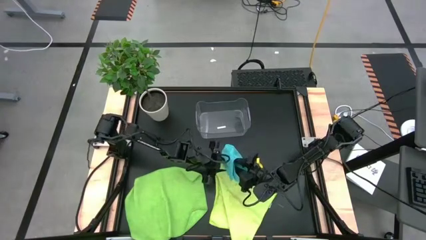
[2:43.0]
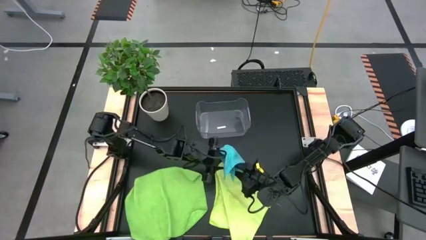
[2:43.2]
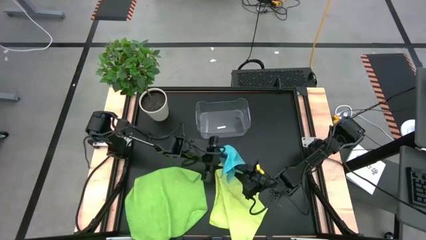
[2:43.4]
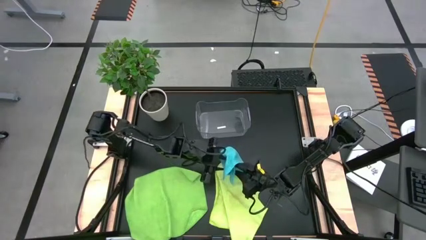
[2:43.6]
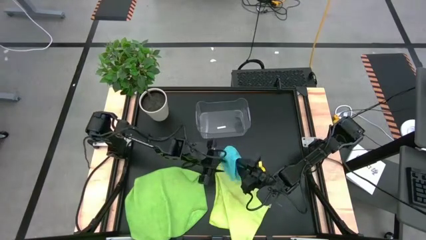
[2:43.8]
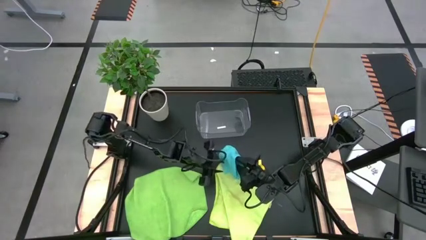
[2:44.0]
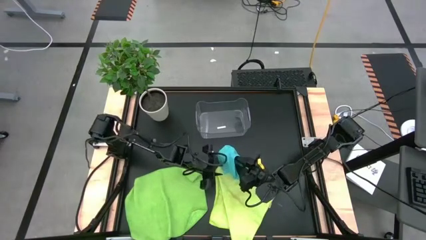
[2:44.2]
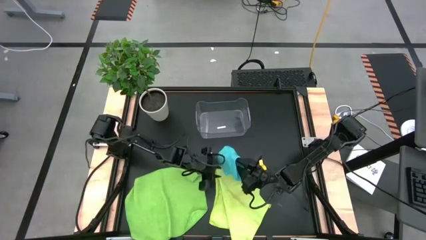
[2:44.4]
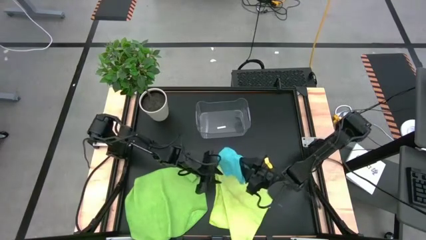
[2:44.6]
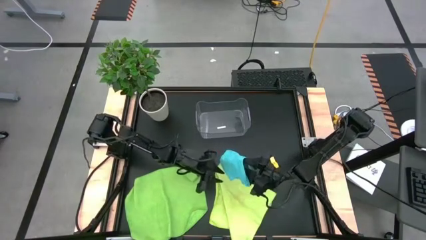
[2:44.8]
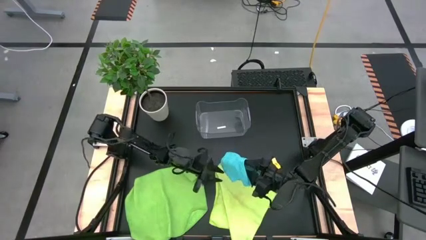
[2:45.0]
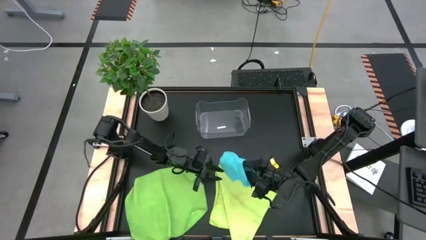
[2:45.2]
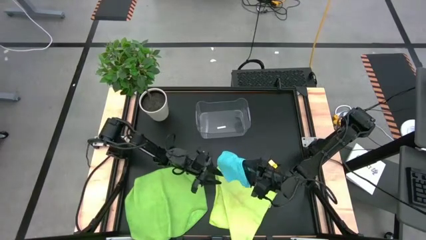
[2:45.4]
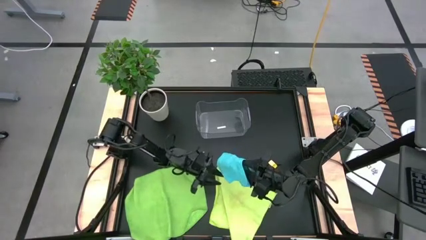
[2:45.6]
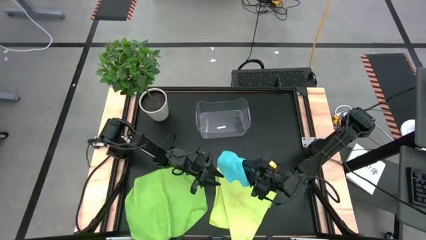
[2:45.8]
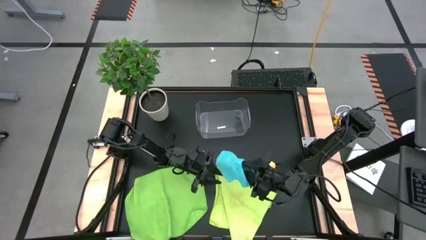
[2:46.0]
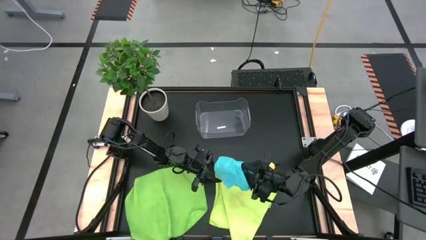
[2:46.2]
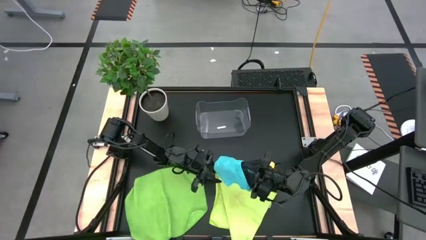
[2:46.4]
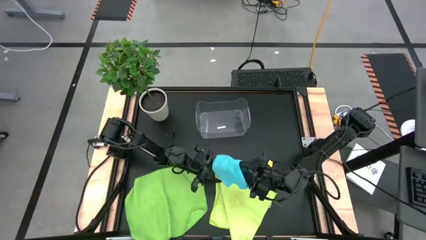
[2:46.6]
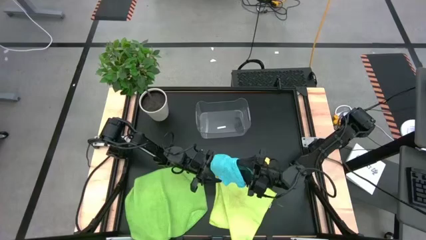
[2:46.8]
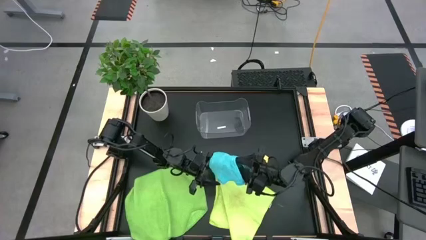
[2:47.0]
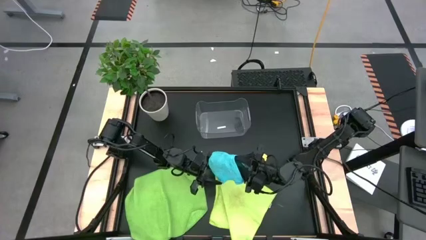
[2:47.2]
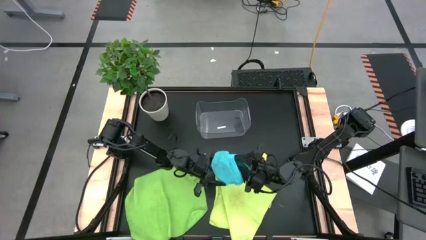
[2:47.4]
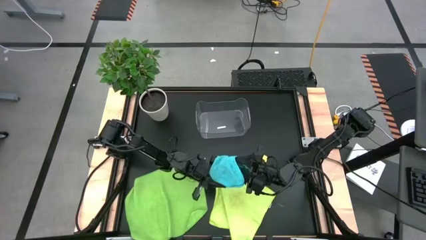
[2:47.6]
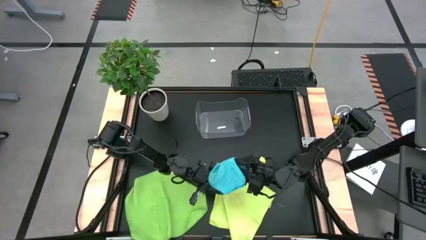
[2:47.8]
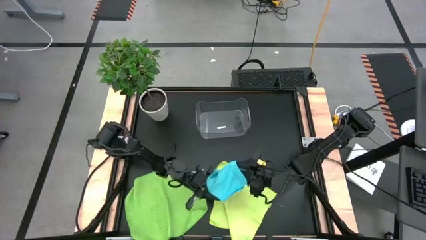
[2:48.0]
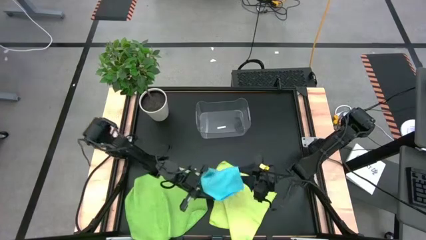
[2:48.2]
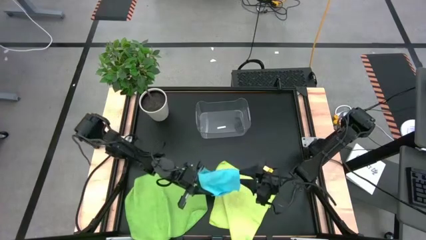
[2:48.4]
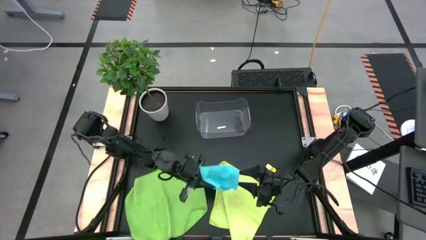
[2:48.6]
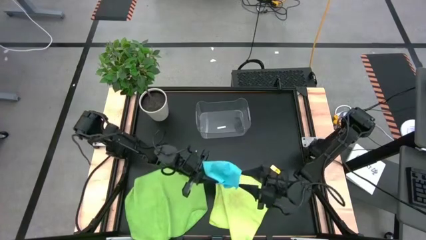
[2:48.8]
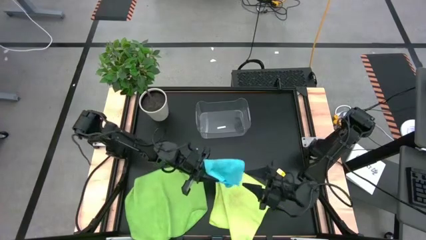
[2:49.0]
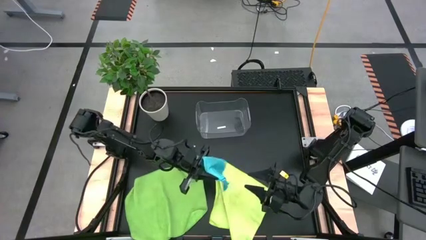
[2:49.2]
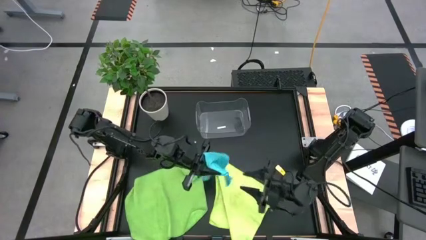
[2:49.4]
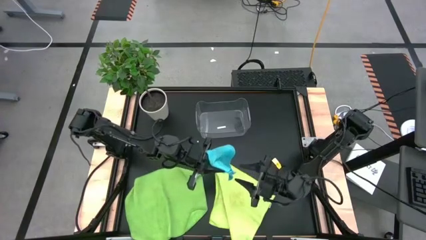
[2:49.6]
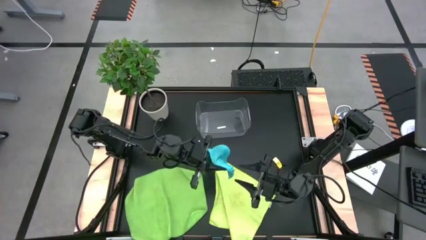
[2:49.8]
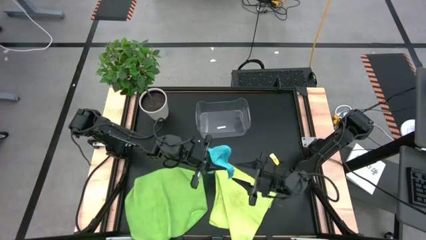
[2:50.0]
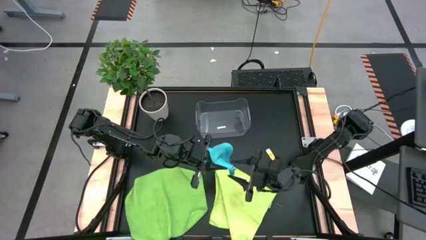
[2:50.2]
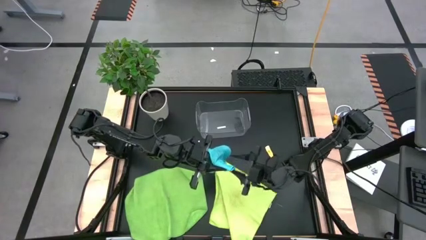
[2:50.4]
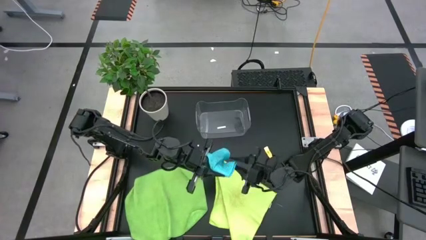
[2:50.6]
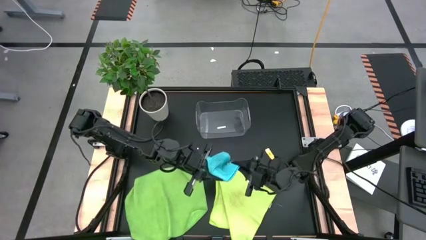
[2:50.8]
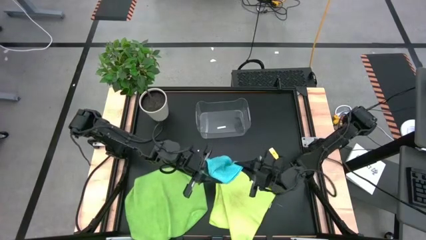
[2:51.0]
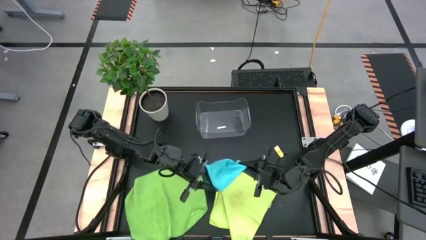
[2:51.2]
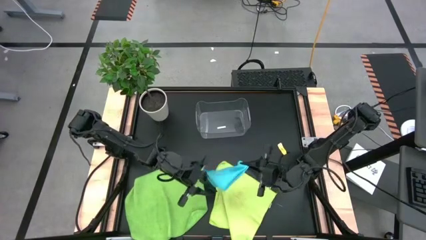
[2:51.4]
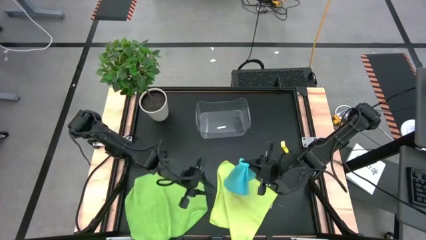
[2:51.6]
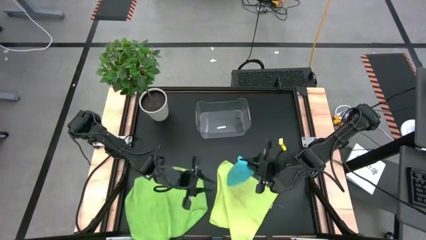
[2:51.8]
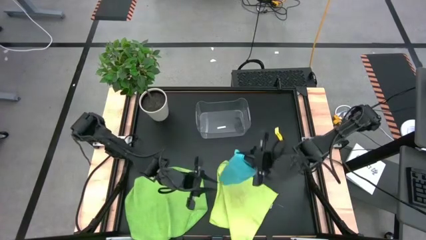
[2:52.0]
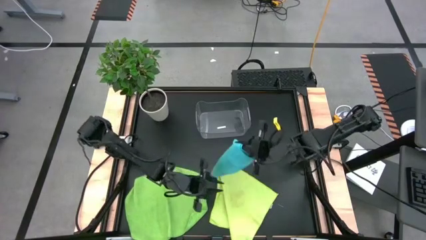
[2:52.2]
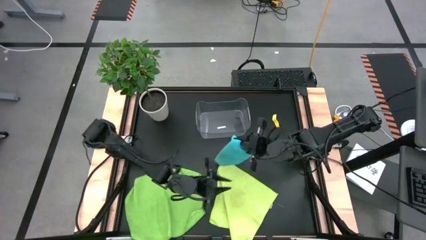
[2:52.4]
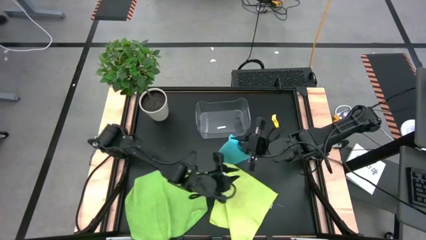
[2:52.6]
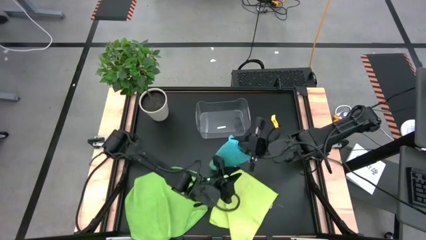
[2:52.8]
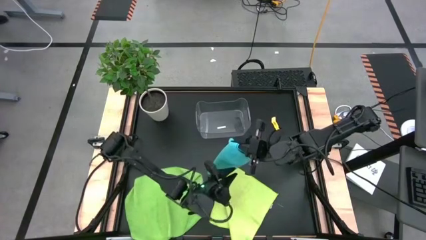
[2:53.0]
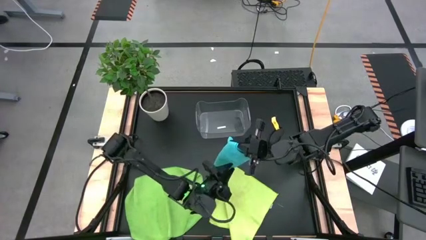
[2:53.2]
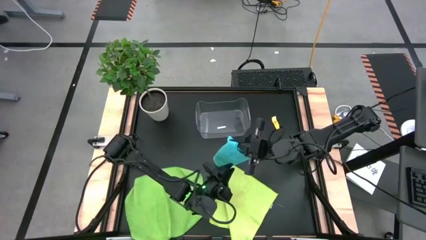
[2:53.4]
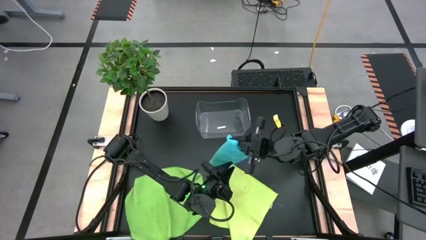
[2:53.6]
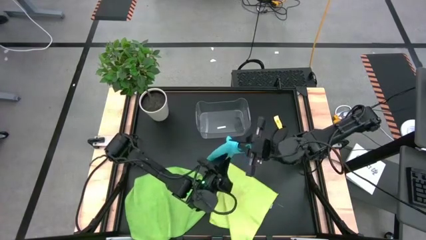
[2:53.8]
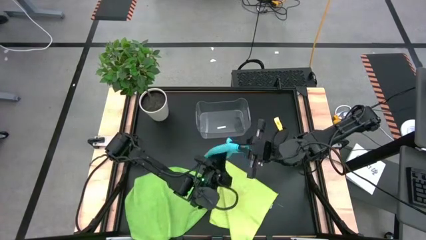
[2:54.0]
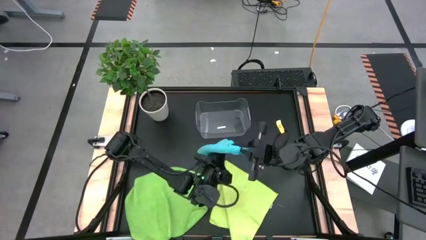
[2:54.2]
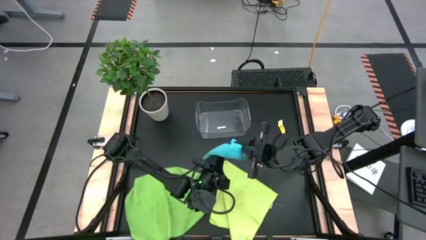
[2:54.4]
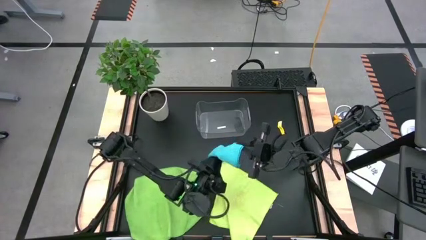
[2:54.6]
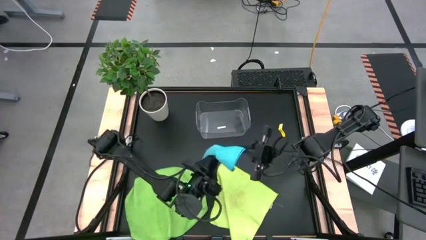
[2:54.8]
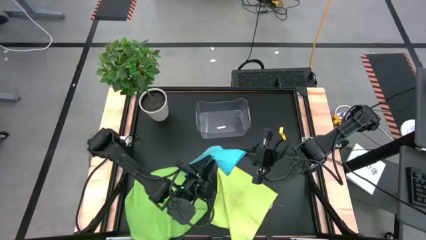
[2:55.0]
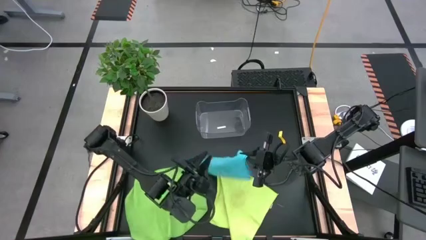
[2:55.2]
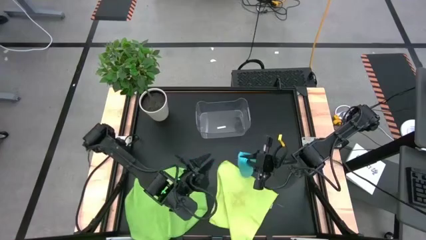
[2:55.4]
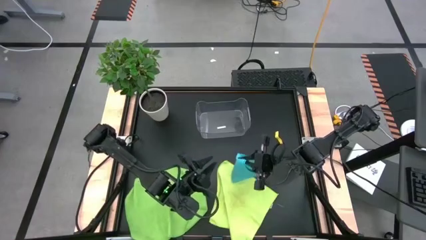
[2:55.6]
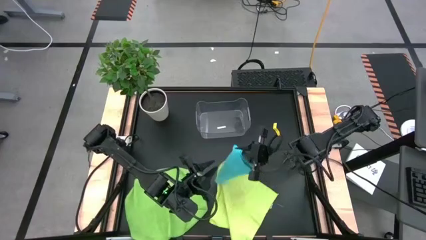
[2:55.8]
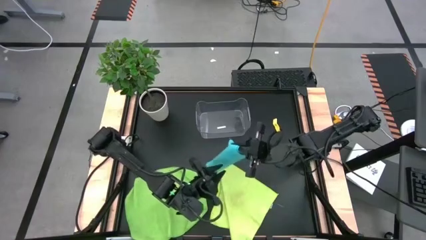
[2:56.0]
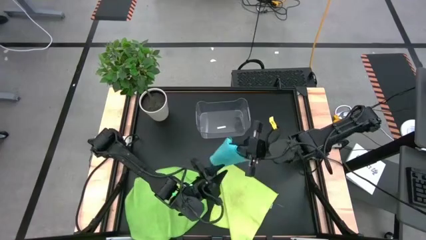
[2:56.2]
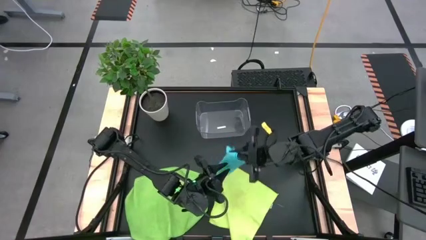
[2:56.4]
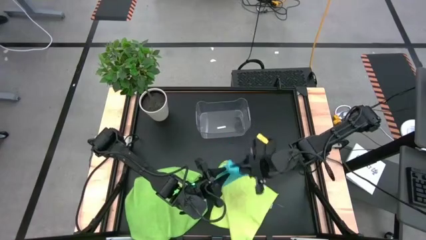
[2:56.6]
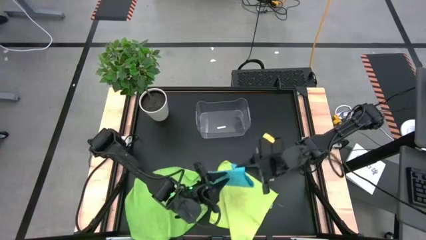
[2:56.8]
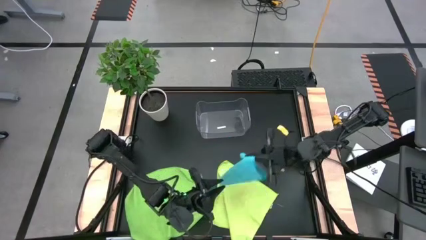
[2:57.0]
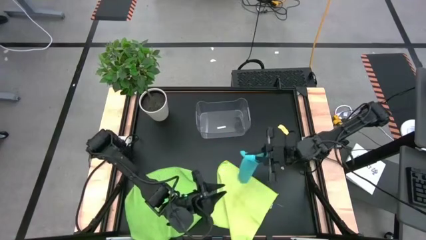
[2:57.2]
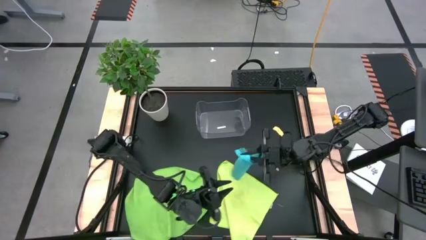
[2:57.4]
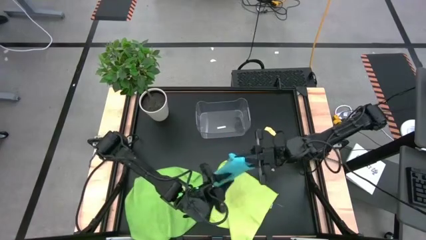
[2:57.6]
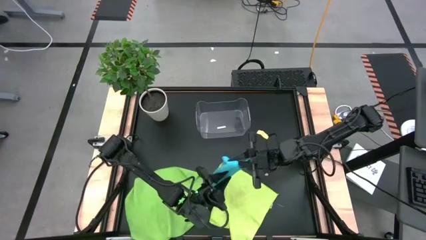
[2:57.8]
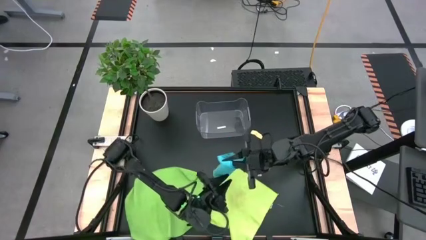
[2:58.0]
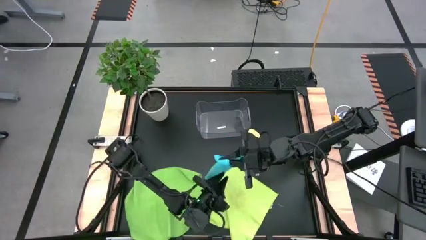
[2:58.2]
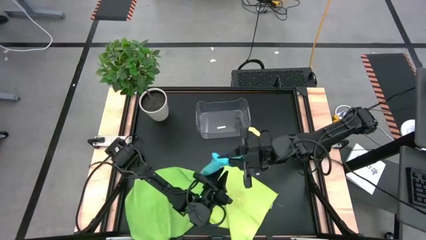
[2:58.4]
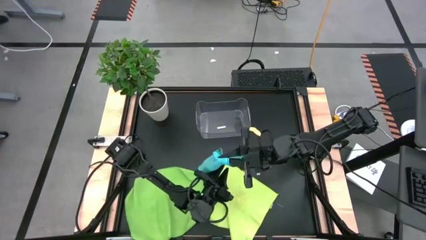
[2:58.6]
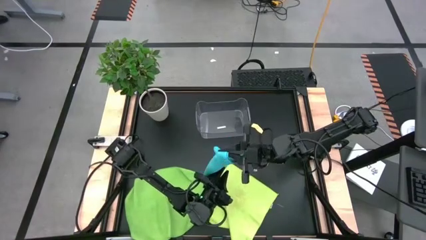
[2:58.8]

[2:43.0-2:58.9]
Task: Fold microfiber towels
Fold the blue towel

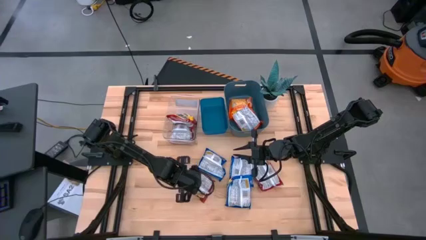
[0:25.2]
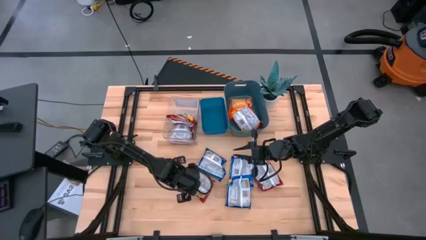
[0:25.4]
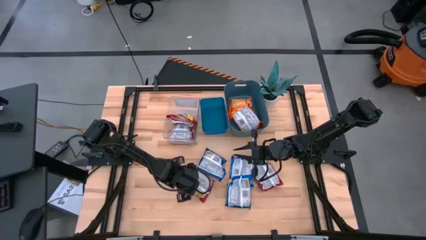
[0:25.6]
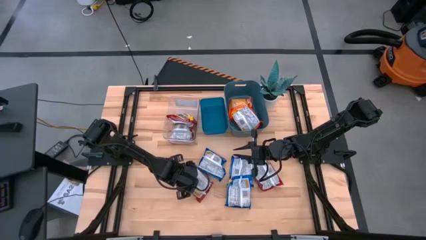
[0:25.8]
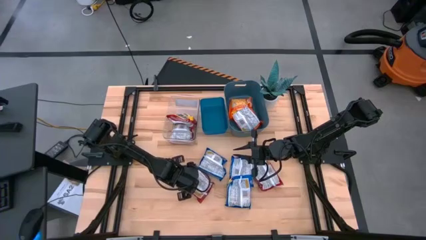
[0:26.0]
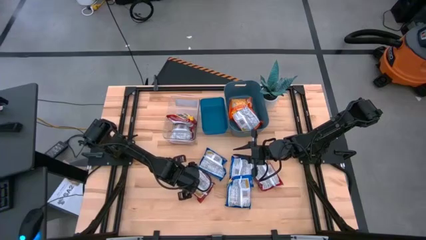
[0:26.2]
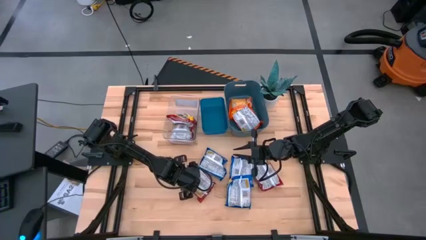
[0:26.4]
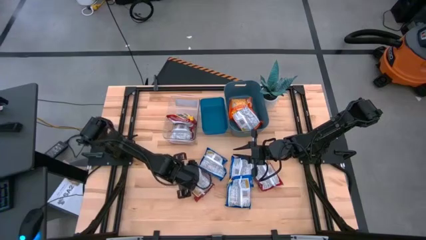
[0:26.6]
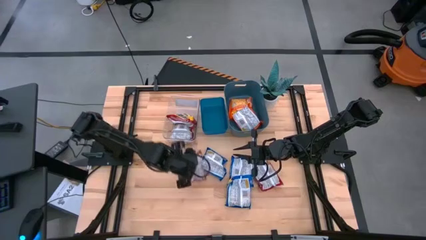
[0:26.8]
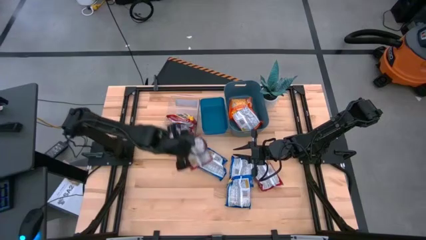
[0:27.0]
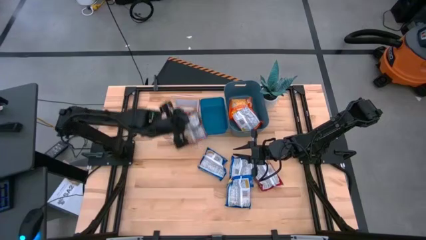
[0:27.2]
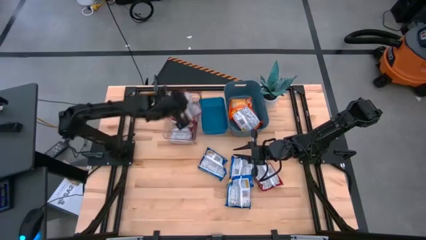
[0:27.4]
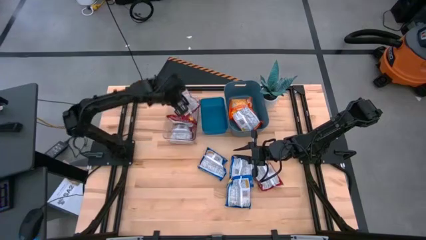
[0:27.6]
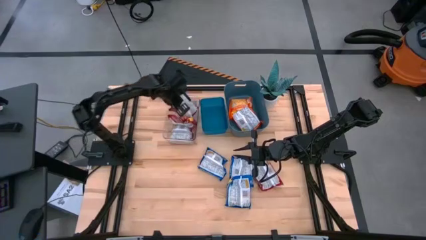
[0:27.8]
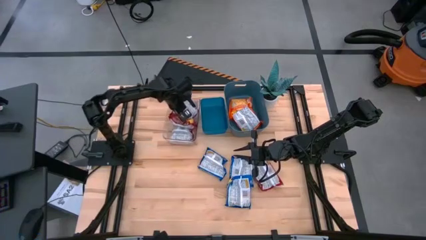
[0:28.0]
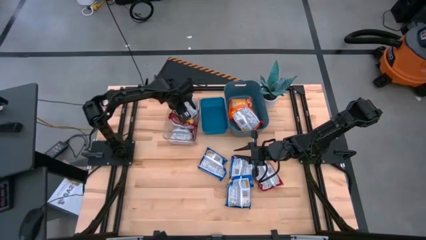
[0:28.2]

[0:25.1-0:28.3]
Task: Sort Maruchan noodles
Put the red noodle pack into the transparent bin
